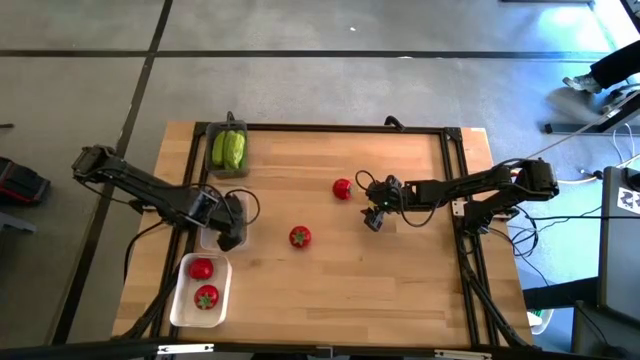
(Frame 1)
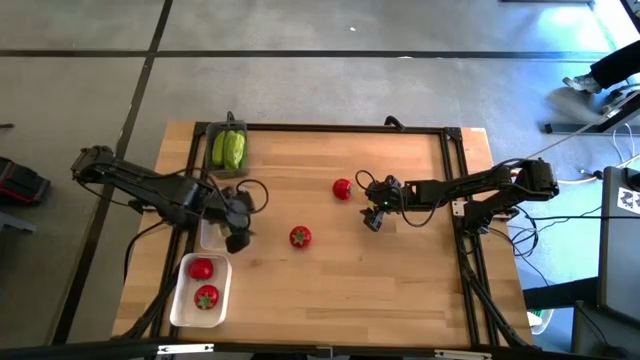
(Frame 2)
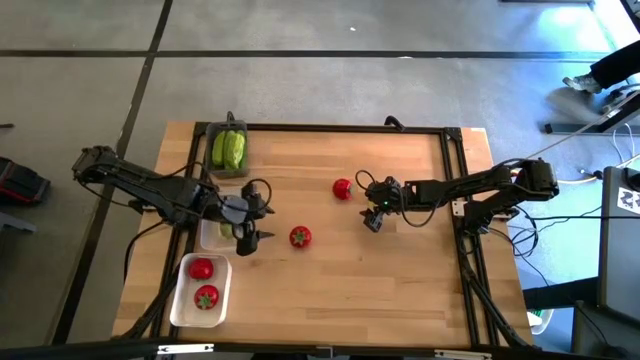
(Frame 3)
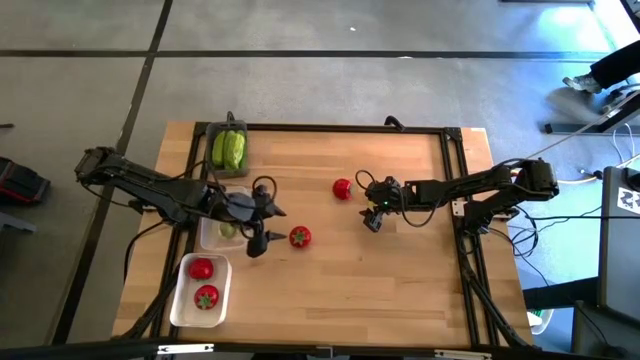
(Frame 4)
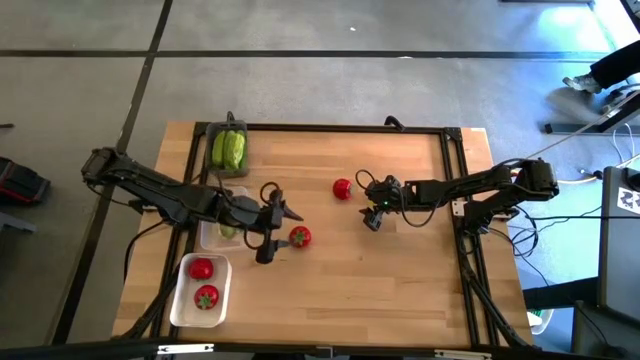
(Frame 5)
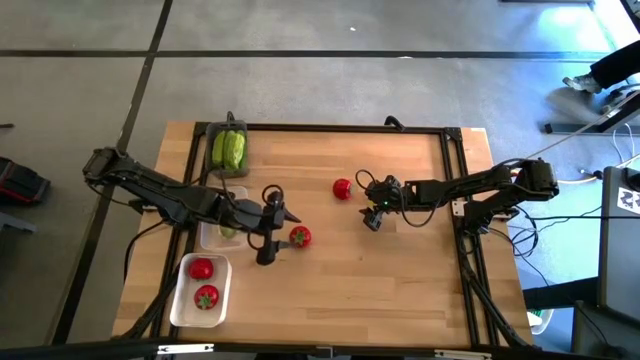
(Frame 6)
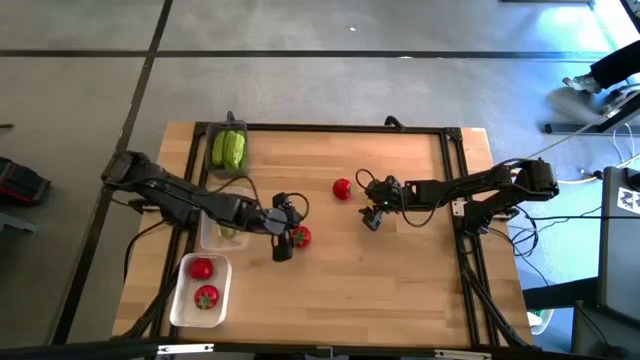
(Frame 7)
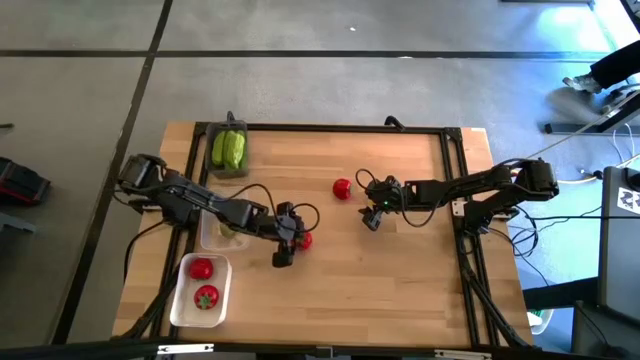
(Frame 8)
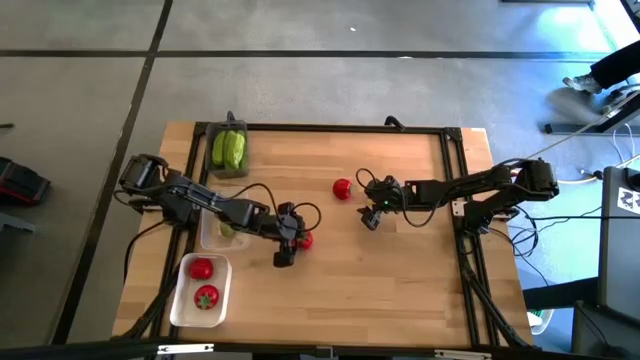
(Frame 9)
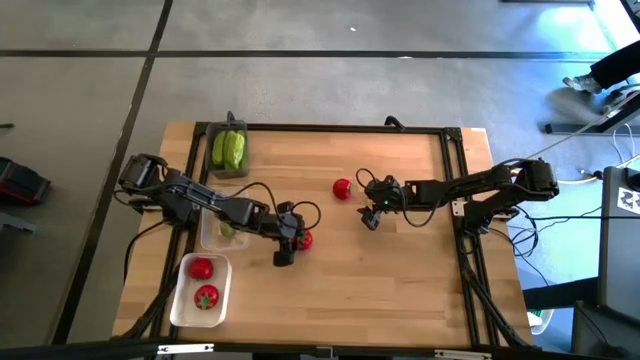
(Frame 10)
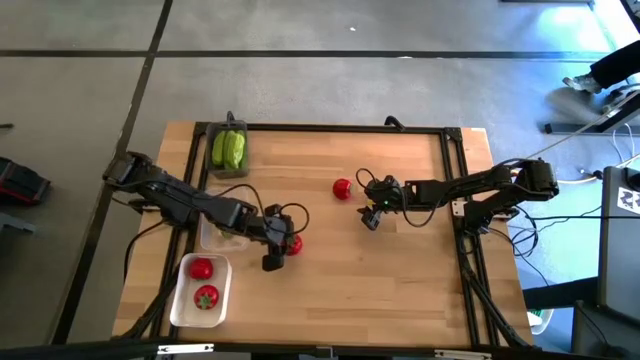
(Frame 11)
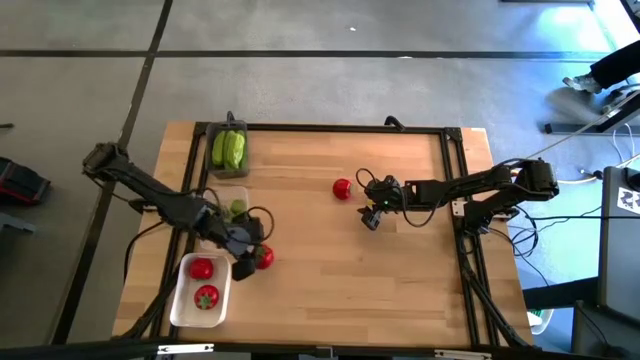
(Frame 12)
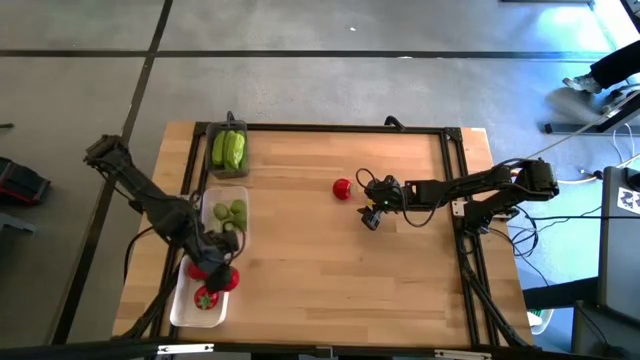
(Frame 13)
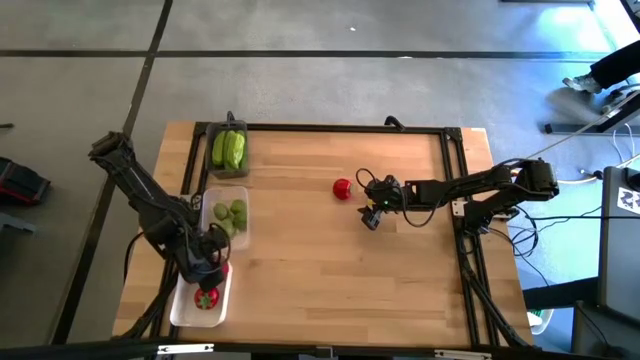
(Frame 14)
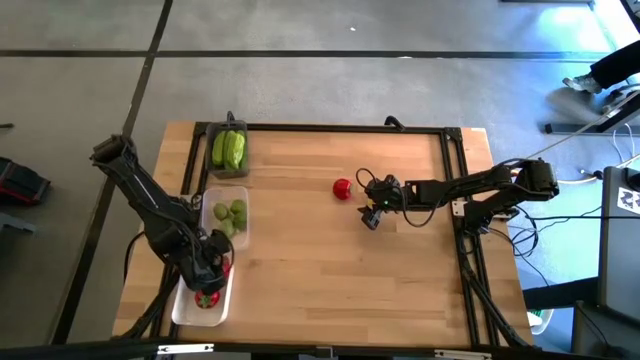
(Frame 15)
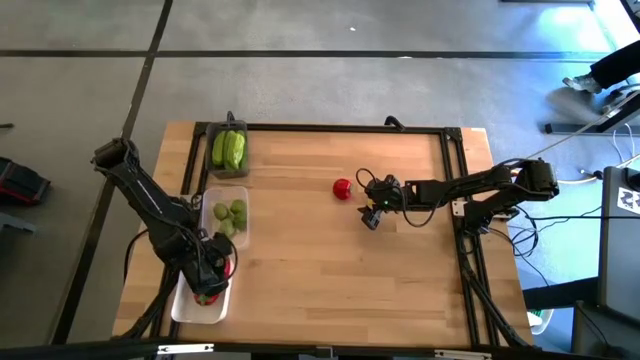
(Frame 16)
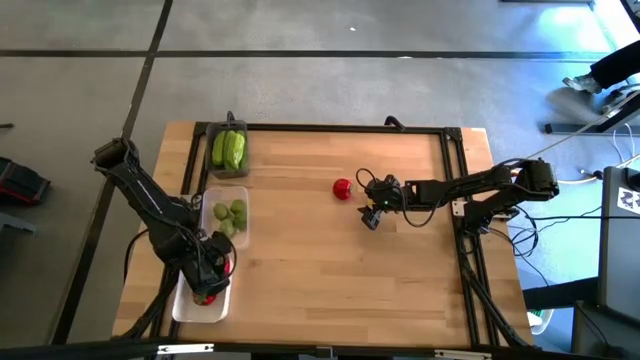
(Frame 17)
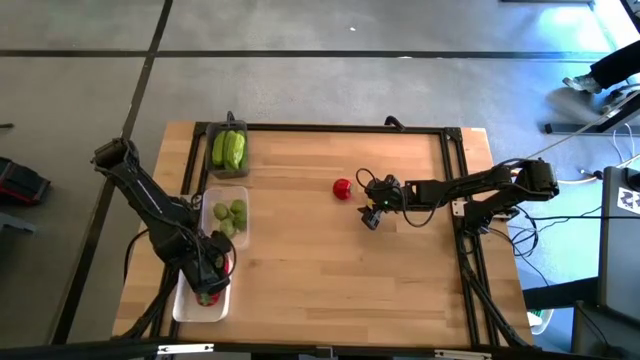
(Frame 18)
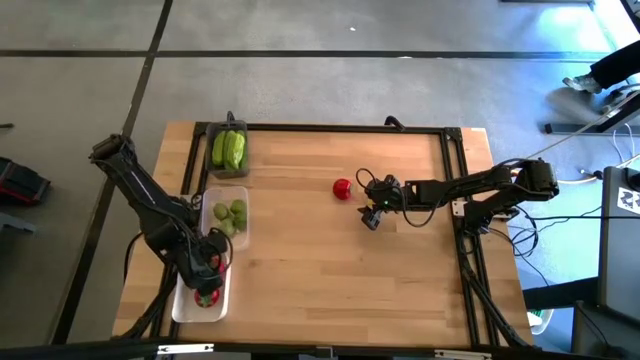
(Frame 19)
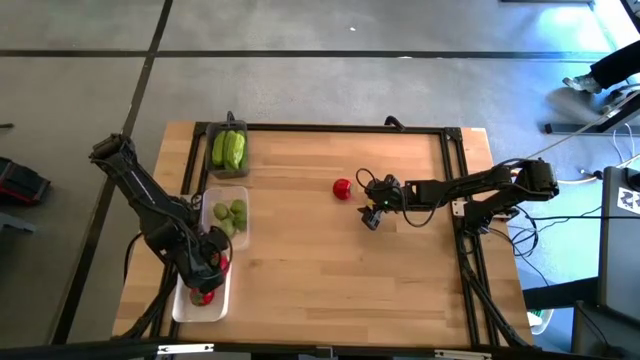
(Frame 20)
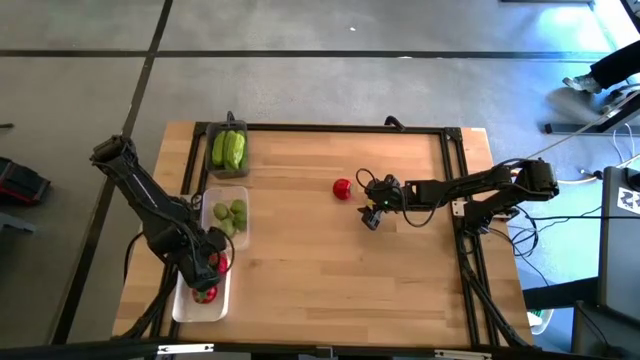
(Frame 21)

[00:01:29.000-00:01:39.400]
Task: Sort produce into baskets
Put the bottom tomato into the white bin

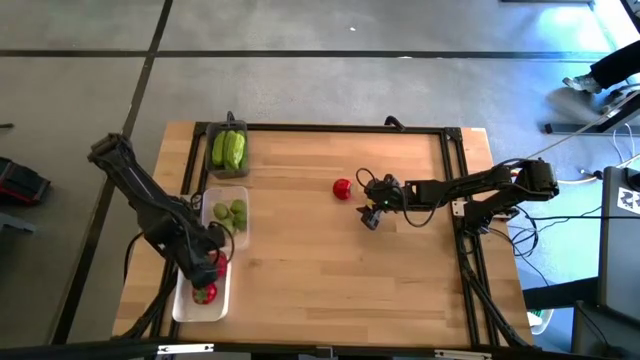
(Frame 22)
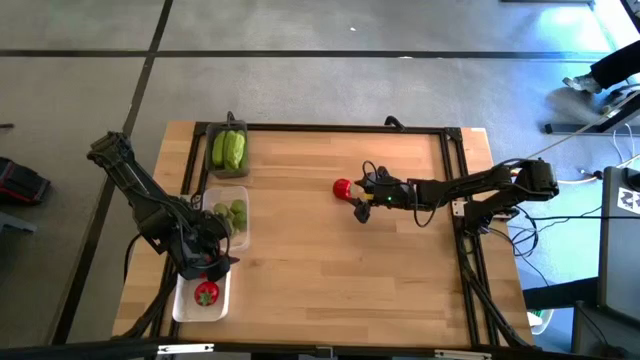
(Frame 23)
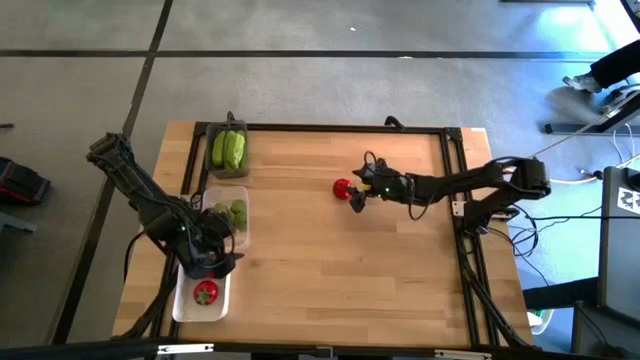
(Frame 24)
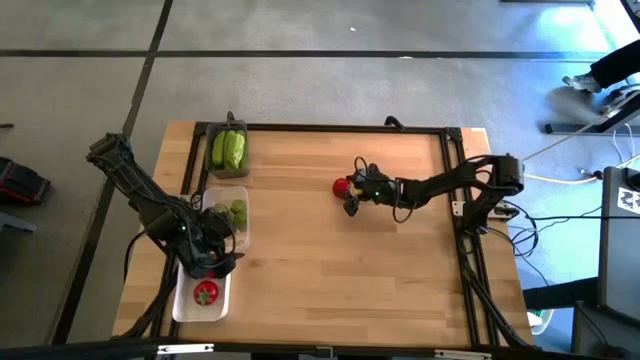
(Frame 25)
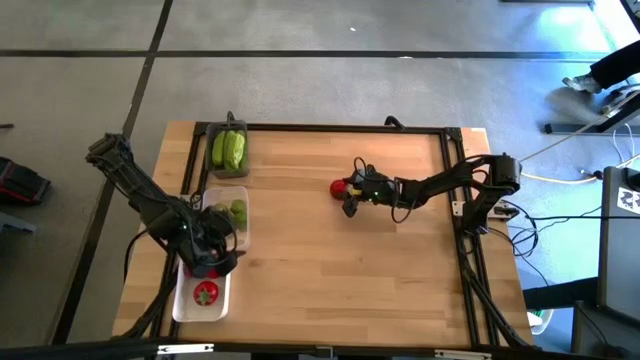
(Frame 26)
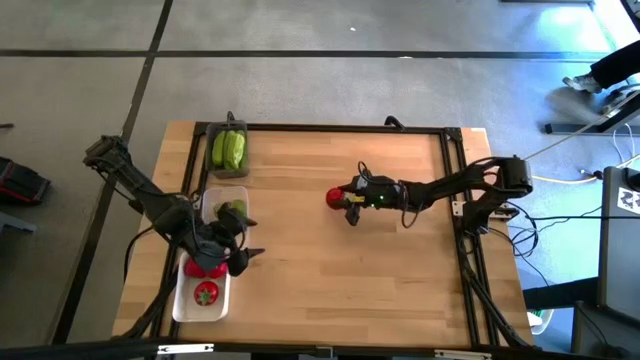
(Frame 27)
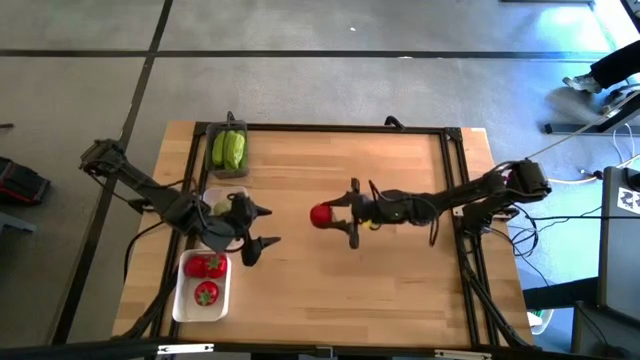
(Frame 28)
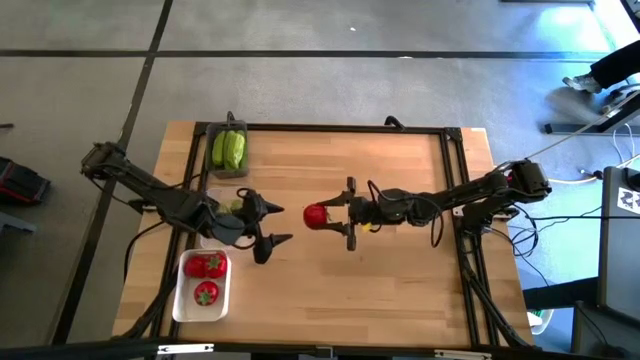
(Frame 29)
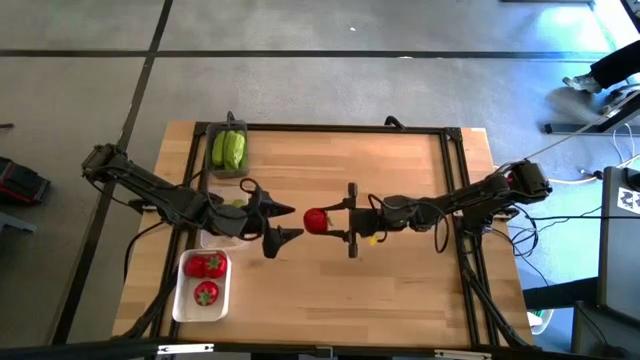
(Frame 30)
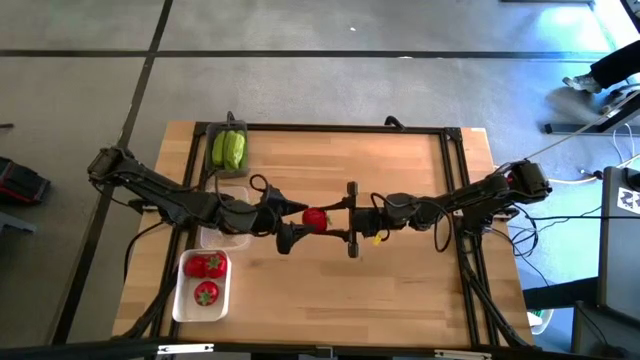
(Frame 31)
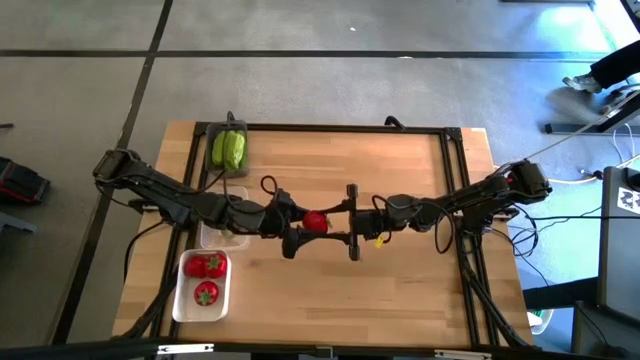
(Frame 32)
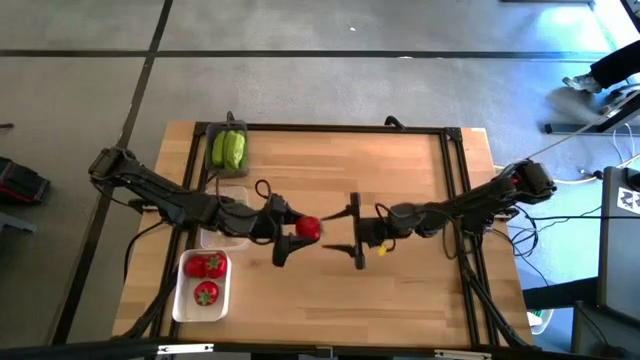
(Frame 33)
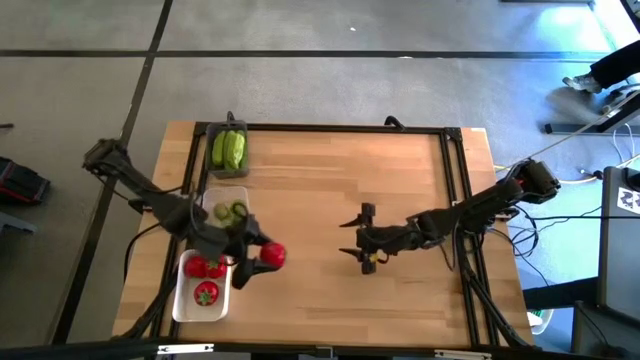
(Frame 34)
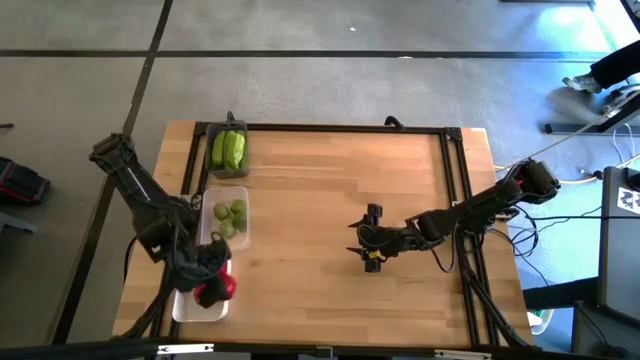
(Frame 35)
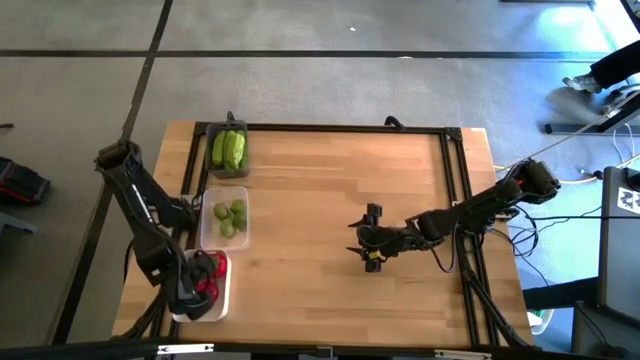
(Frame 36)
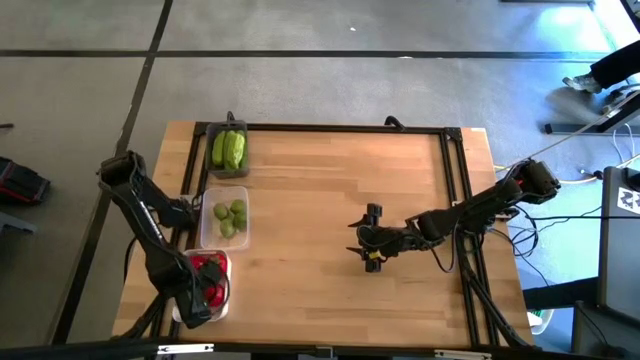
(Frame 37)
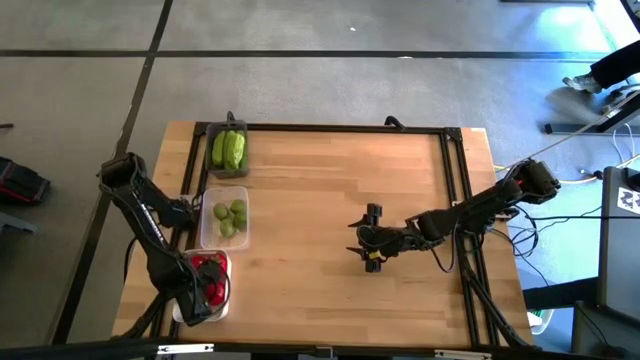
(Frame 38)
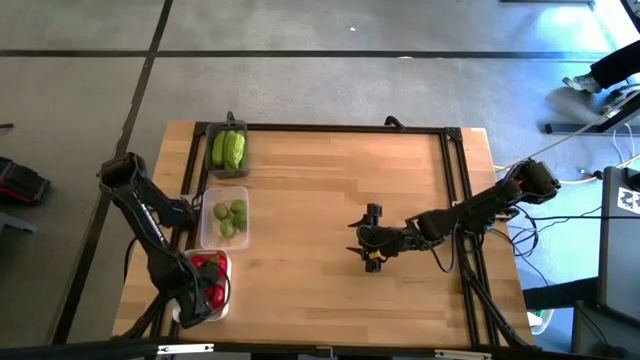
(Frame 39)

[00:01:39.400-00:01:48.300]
Put the tomato into the white bin

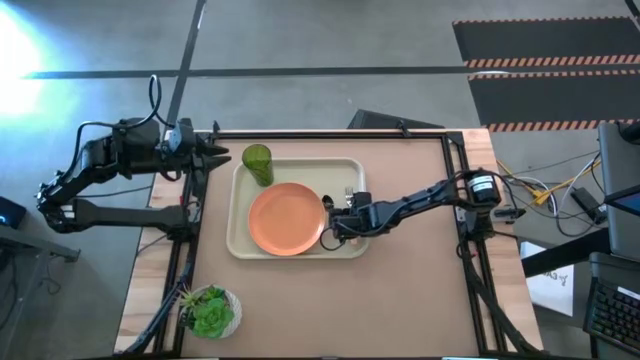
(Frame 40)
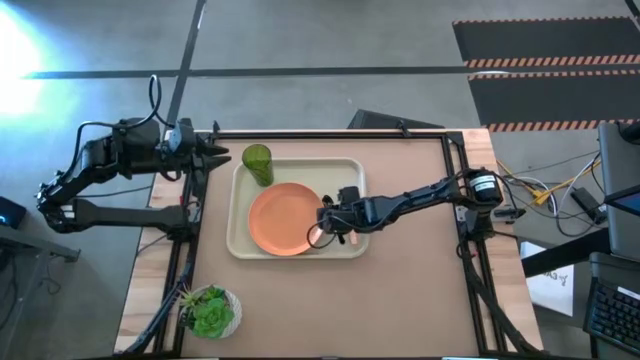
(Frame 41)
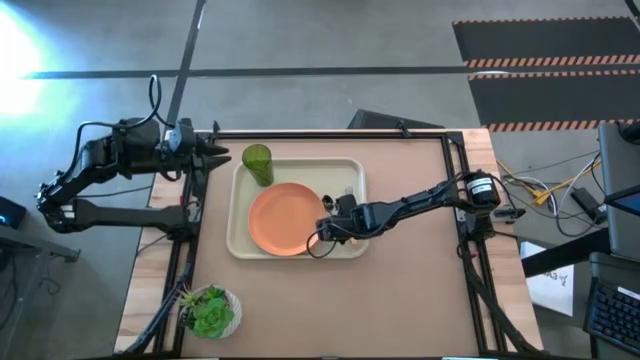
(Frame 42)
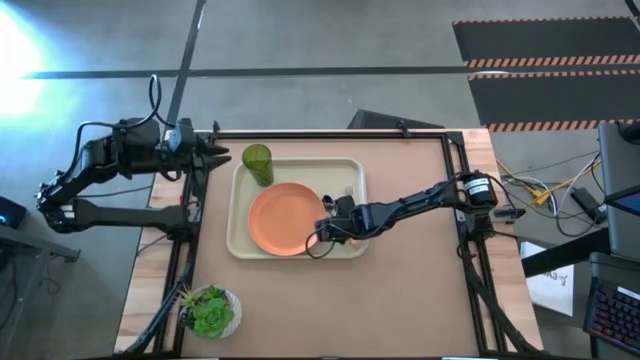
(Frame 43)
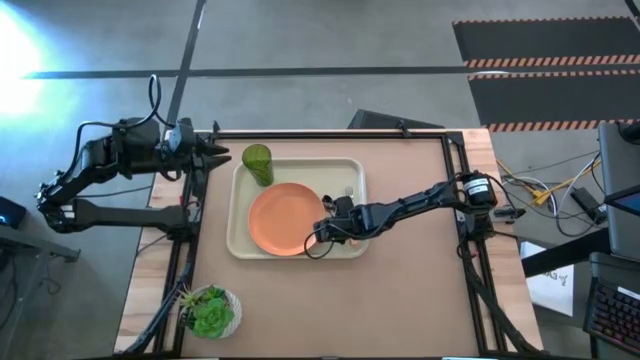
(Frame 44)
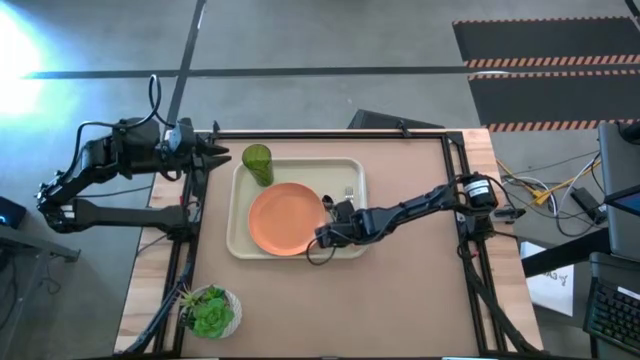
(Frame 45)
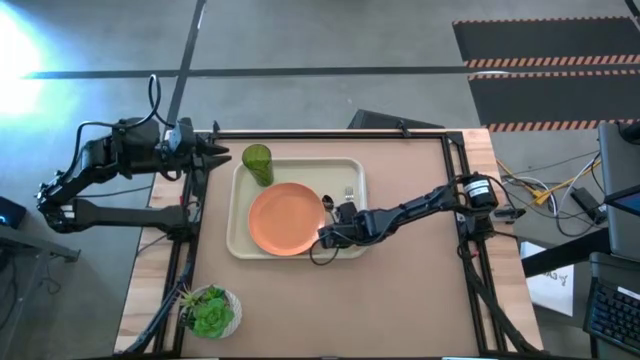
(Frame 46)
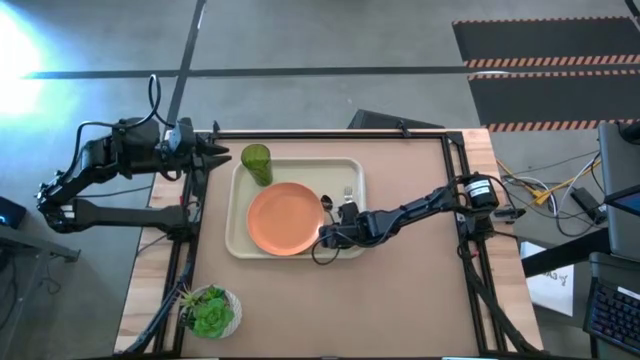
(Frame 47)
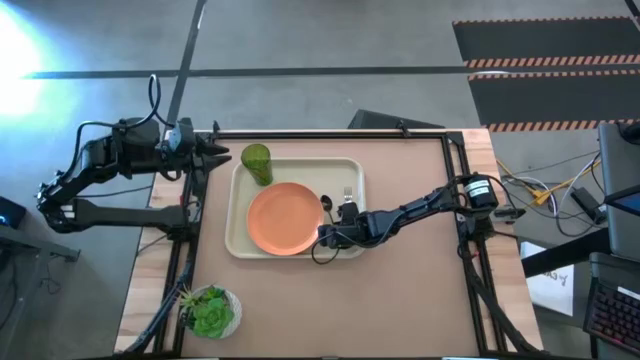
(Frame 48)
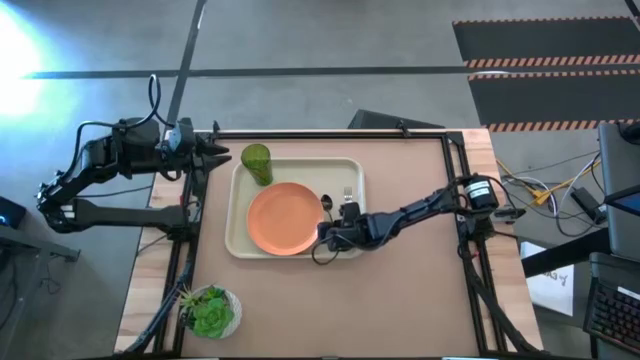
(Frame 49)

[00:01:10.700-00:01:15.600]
Task: Pick and place plate/cup/fork/spoon on tray
Adjust the black spoon on the white serving tray
